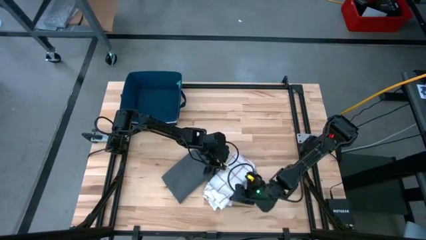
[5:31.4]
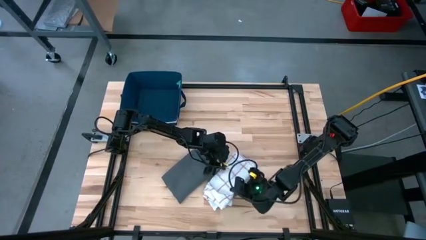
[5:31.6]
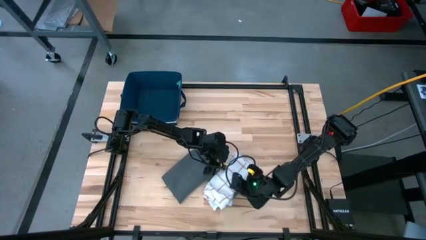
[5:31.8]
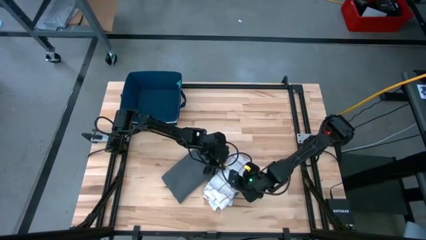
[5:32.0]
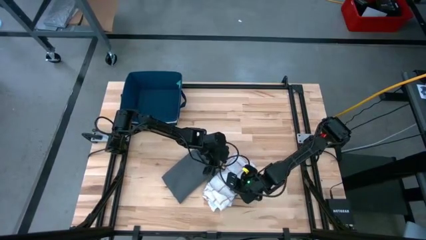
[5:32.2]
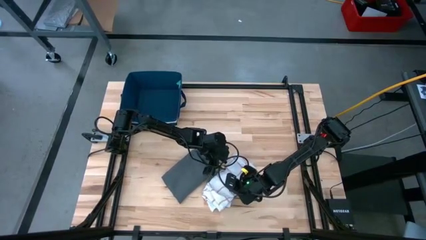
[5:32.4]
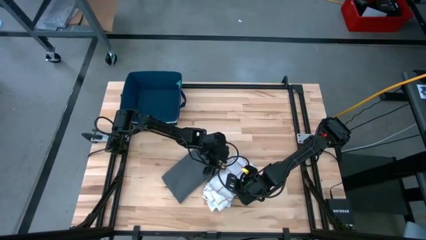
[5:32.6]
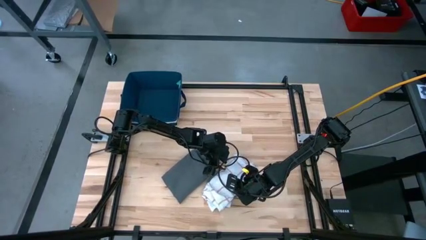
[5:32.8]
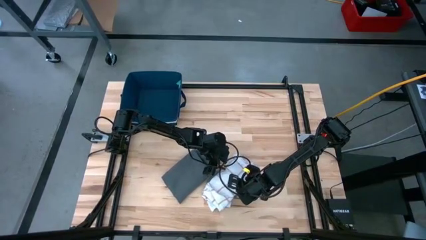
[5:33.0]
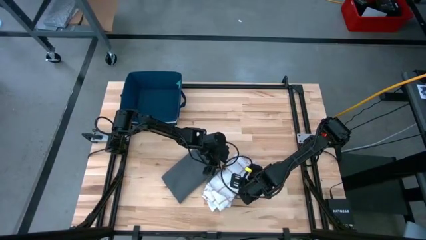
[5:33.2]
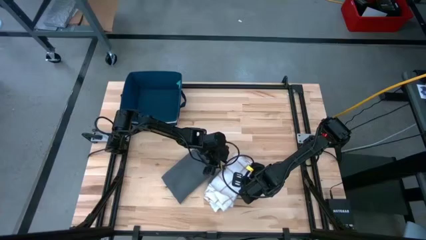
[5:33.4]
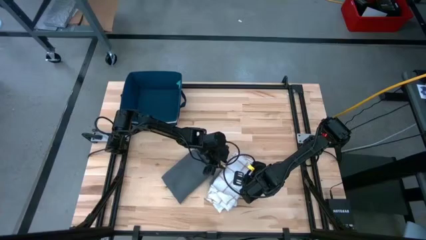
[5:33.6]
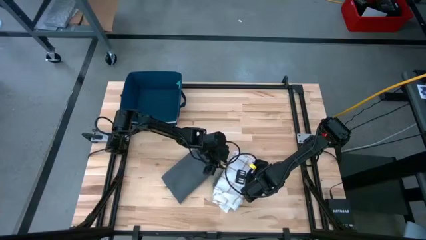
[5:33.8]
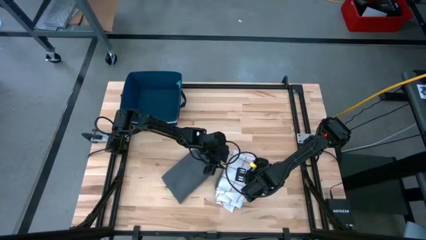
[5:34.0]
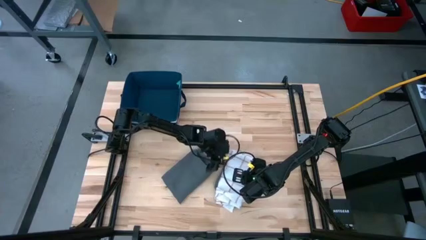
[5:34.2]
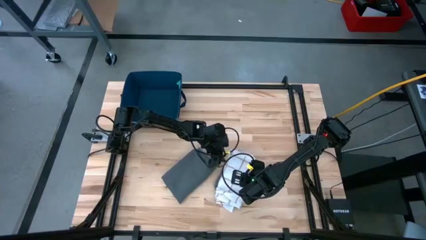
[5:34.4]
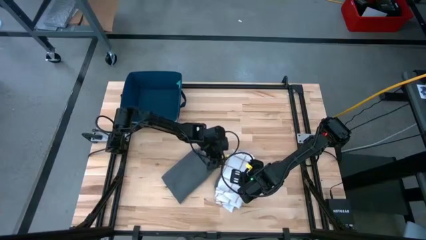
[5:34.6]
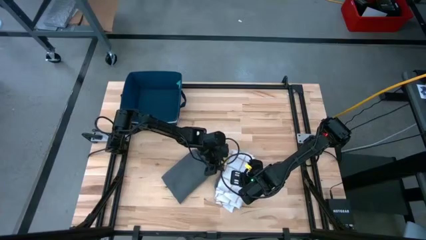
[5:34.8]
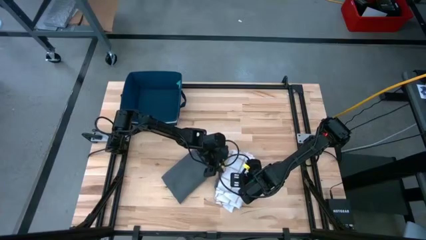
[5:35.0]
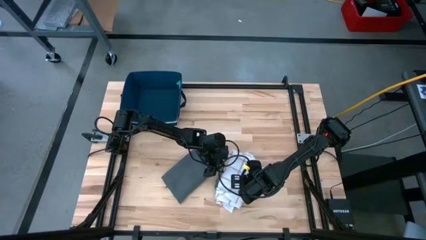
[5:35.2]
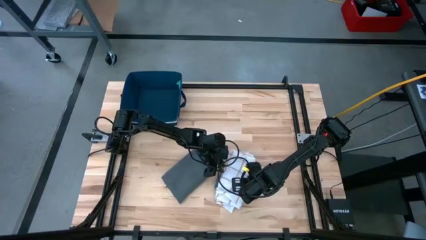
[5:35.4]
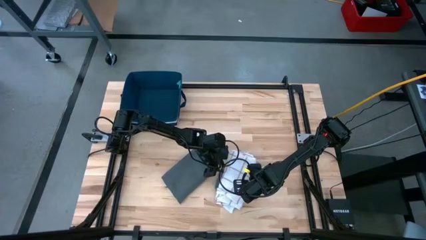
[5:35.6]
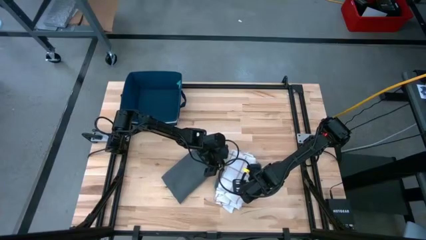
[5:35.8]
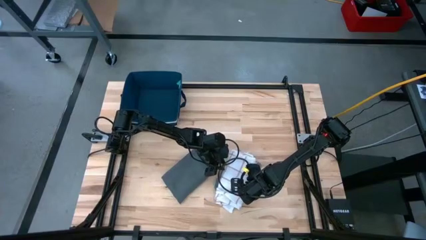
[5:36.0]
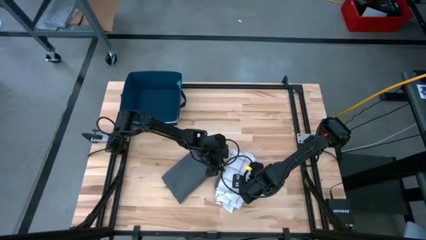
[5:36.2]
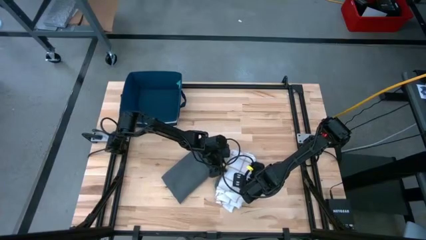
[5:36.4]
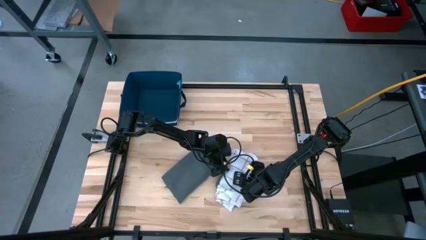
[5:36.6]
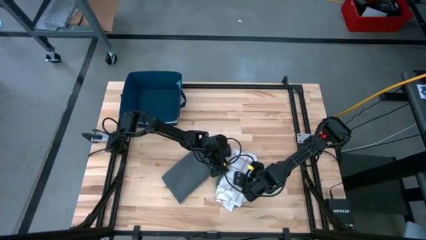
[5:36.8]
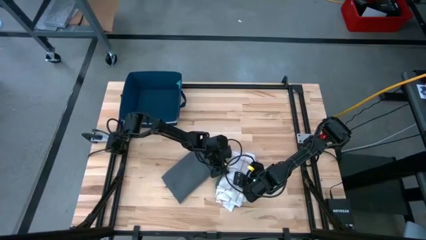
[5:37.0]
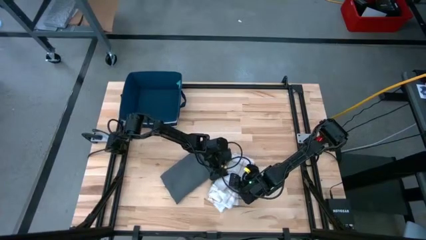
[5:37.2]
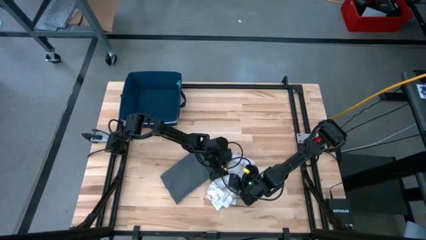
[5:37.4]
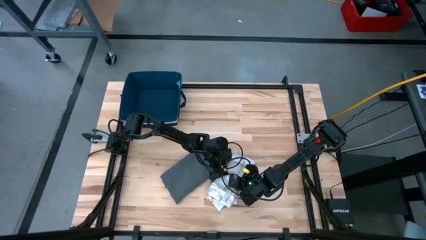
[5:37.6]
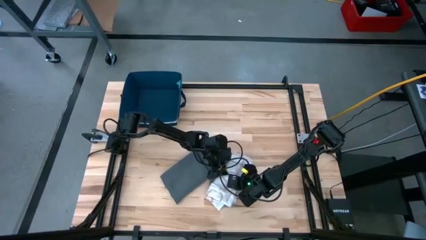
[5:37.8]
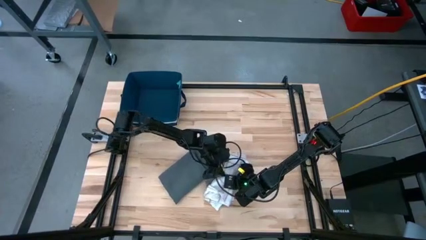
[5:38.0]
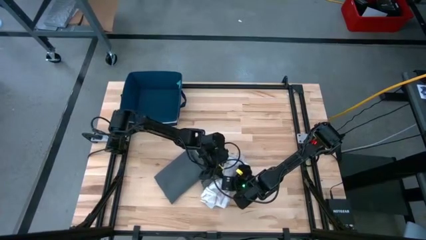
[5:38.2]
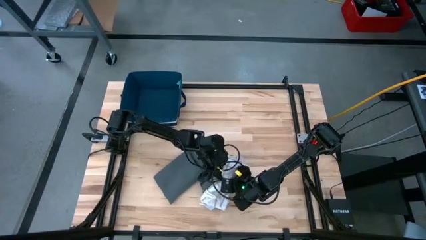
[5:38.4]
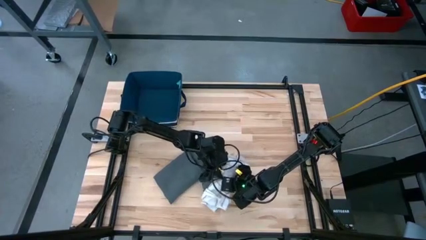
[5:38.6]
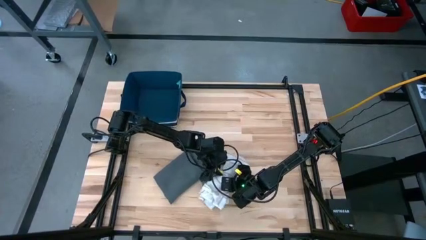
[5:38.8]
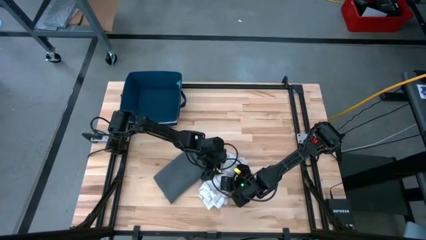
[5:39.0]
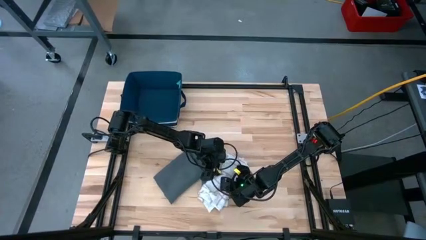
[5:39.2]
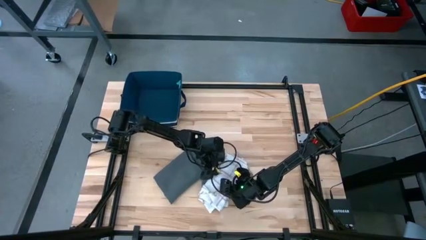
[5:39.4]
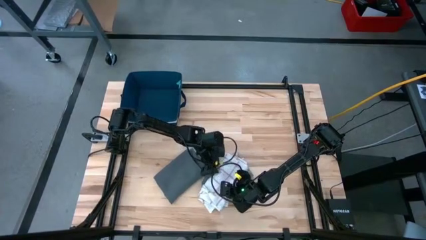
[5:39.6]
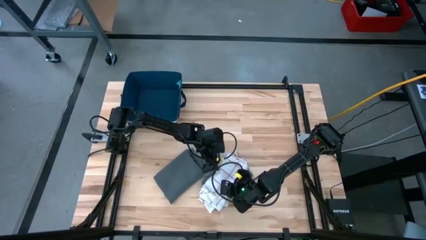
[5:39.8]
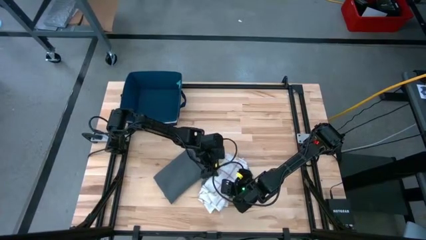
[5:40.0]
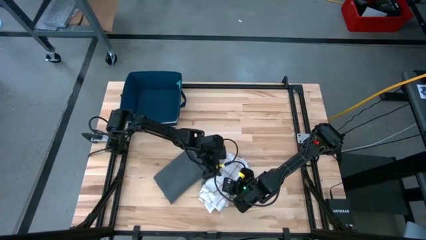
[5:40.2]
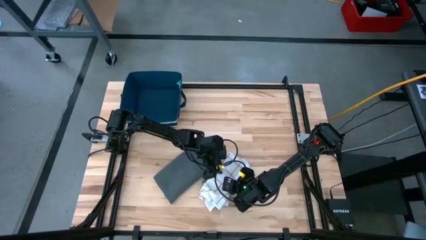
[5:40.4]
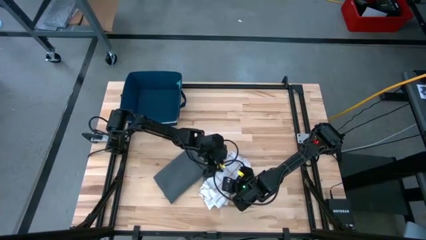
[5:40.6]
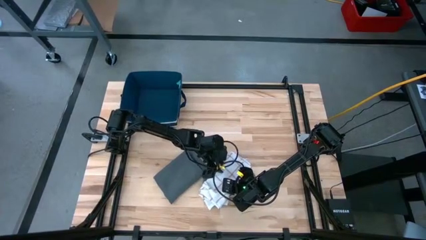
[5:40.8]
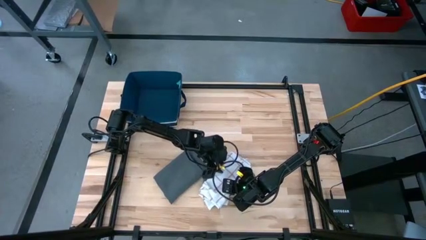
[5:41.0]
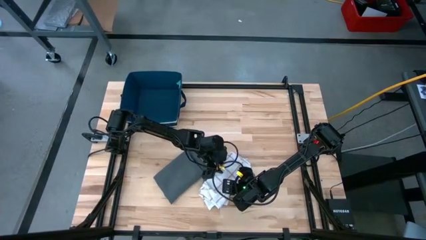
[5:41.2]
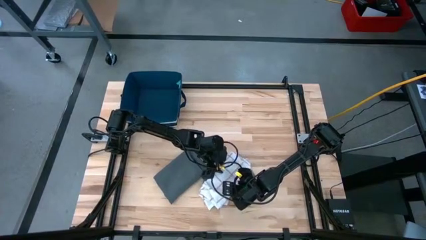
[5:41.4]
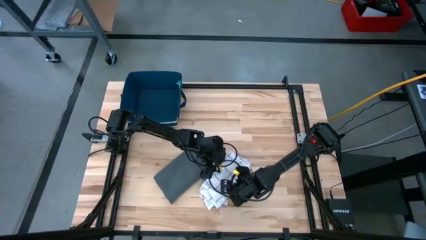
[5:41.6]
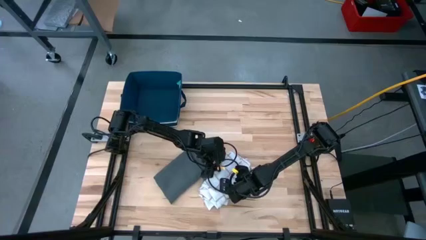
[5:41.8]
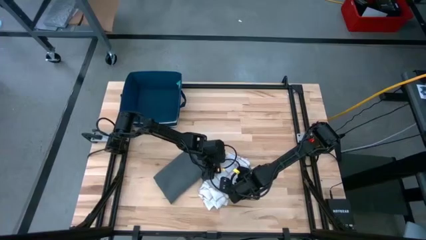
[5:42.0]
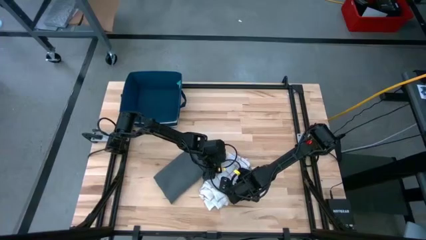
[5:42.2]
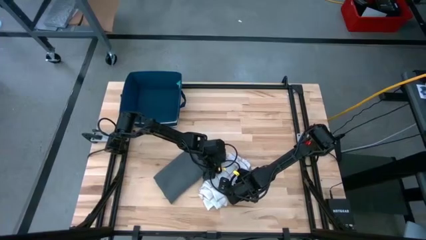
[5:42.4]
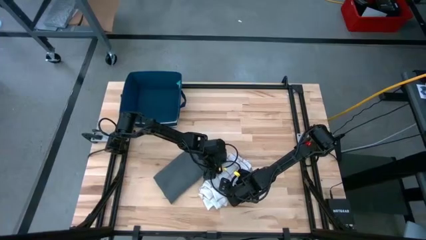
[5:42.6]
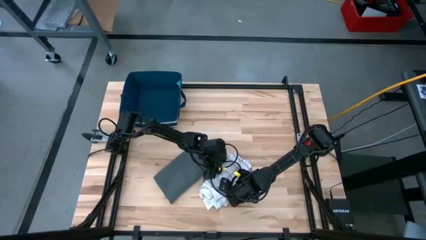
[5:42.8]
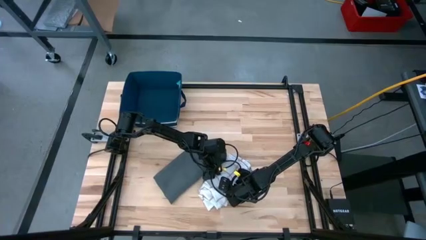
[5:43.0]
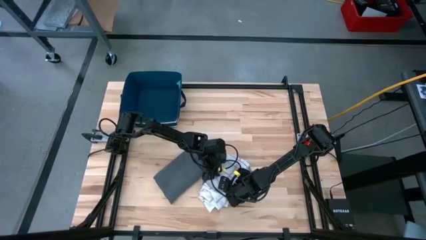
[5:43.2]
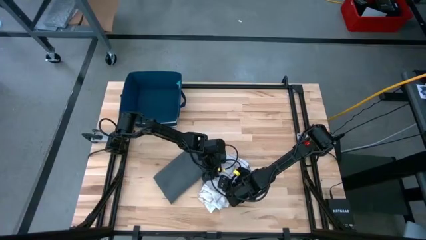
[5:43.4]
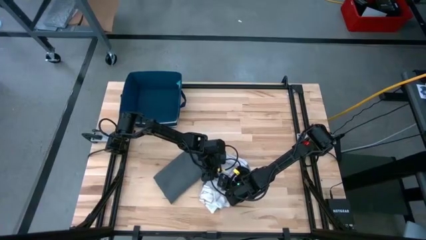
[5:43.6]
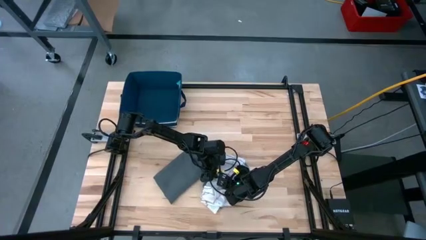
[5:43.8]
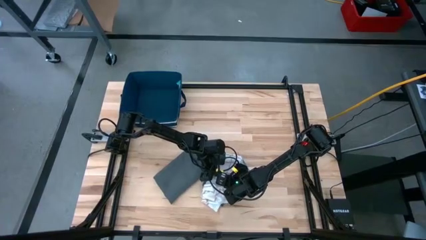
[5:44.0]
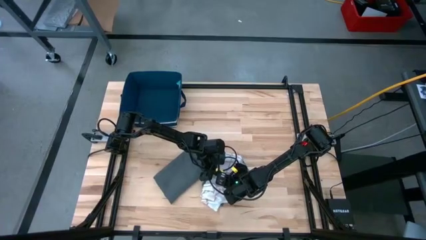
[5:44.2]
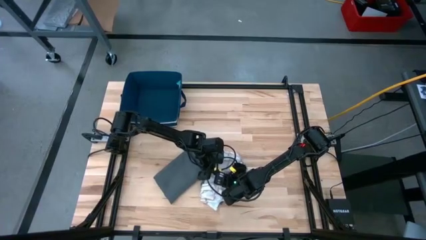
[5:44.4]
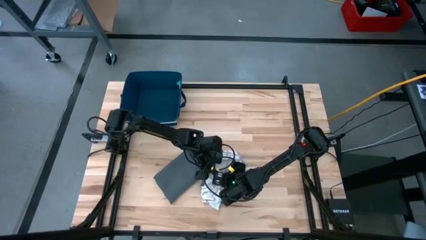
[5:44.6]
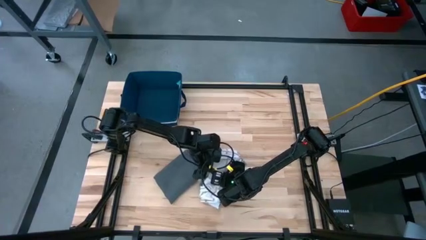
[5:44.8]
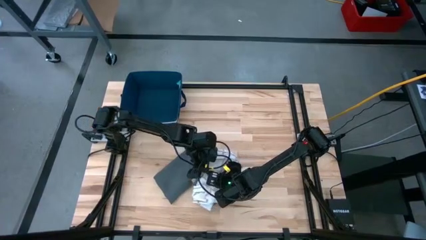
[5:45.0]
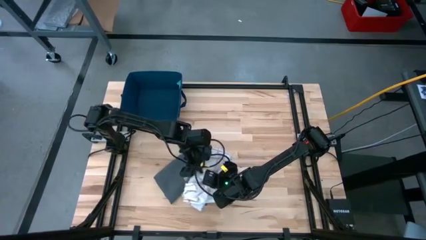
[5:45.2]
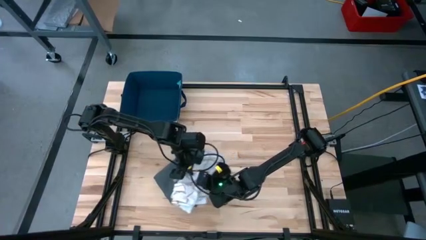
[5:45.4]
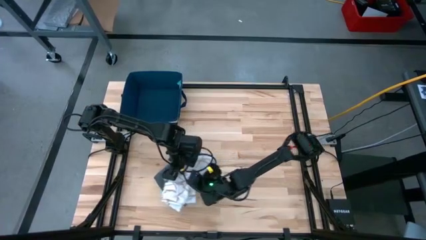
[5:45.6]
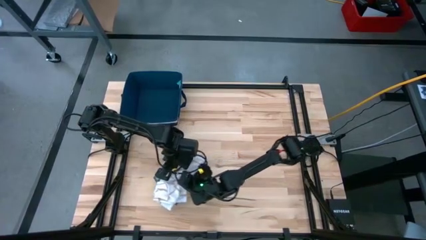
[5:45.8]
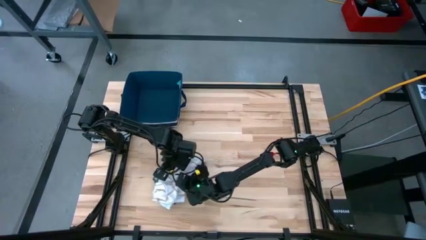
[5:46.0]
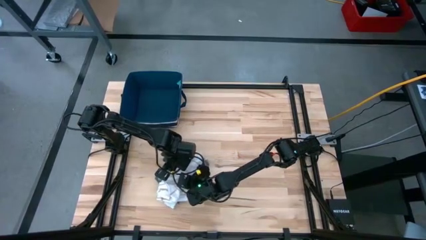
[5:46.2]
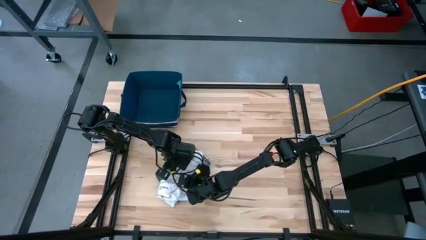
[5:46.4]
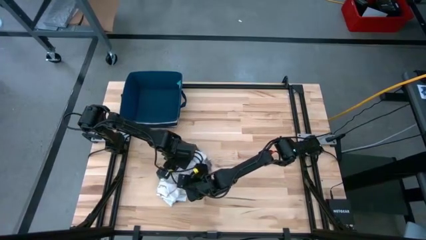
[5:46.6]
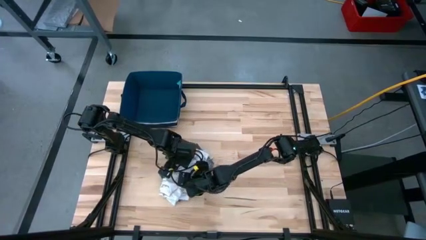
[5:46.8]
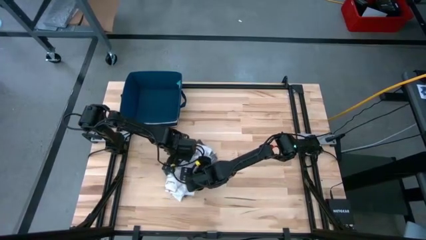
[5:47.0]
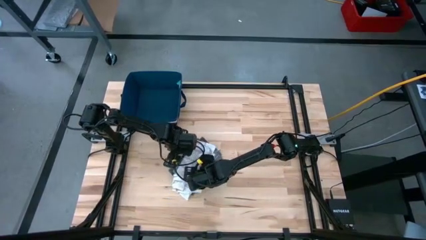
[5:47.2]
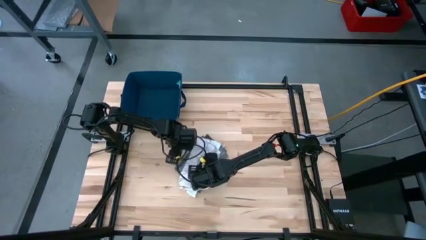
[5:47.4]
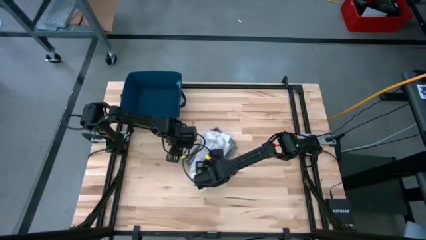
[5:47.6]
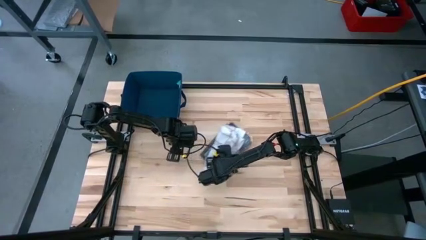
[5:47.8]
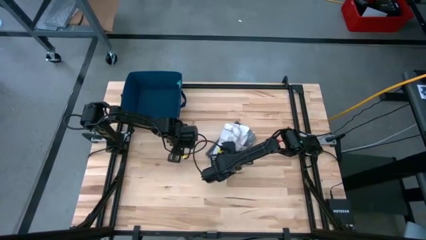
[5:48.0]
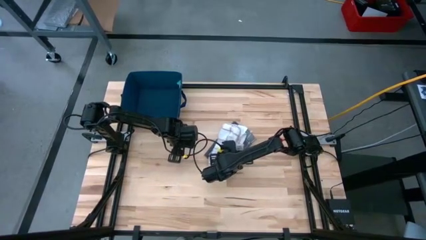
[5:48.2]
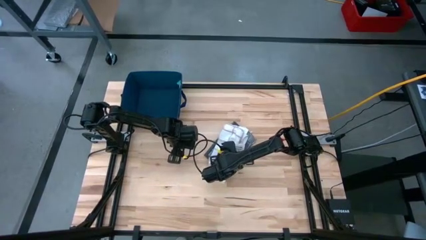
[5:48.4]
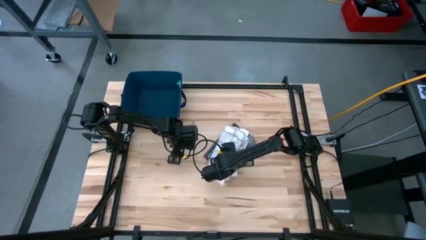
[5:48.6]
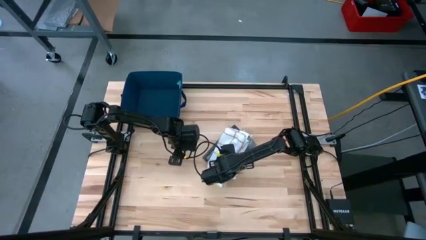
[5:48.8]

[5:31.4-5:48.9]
Task: Fold towel
Stack the stacked towels on top of the gray towel
